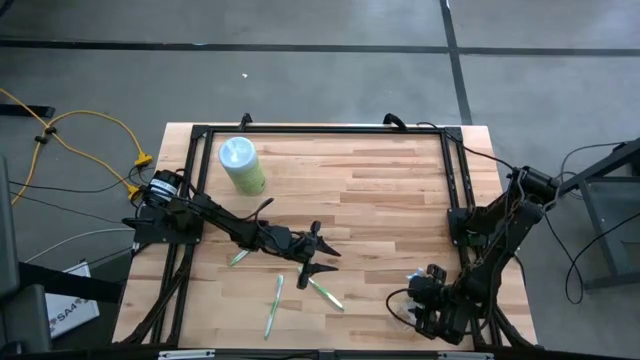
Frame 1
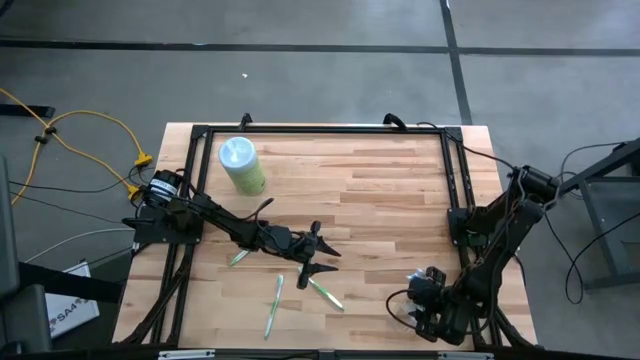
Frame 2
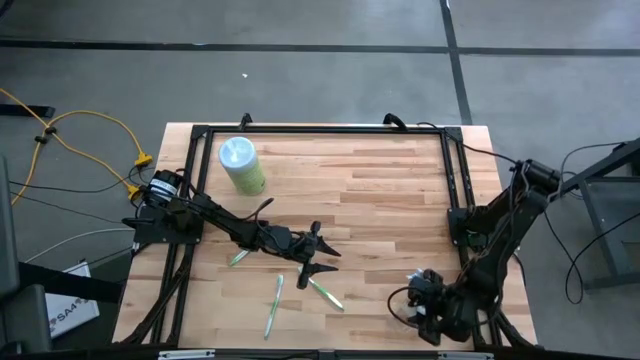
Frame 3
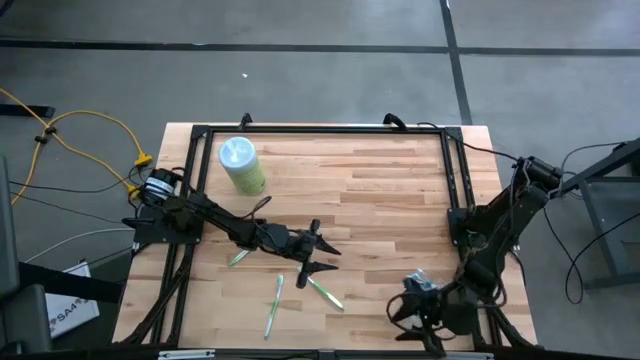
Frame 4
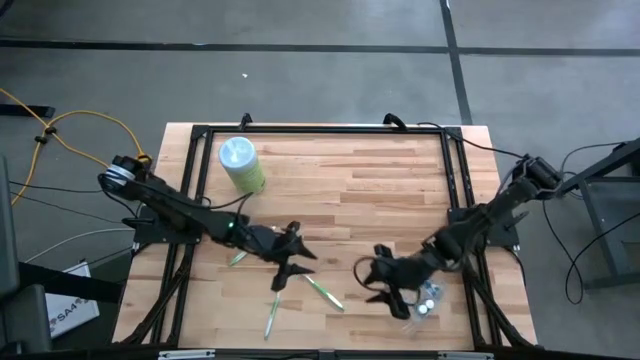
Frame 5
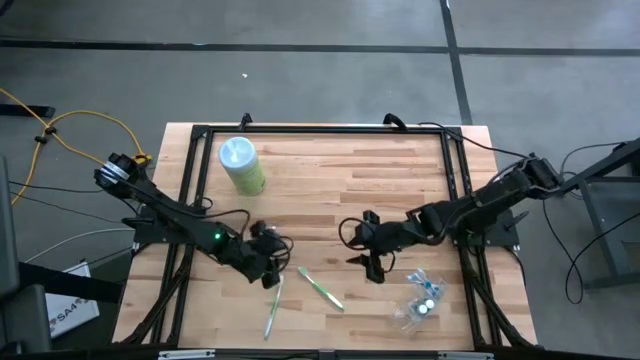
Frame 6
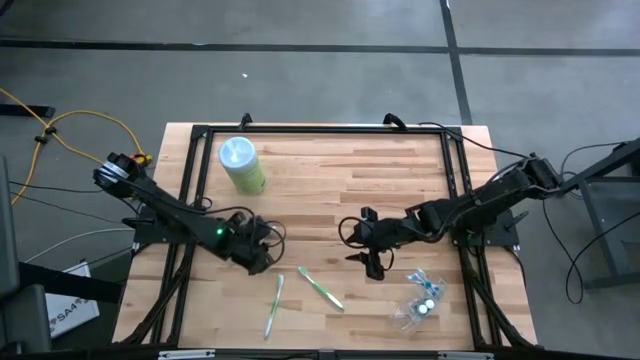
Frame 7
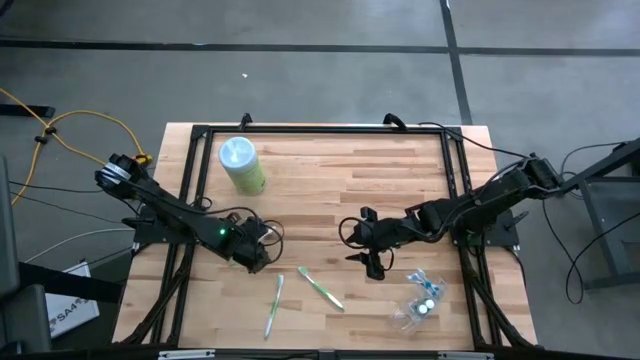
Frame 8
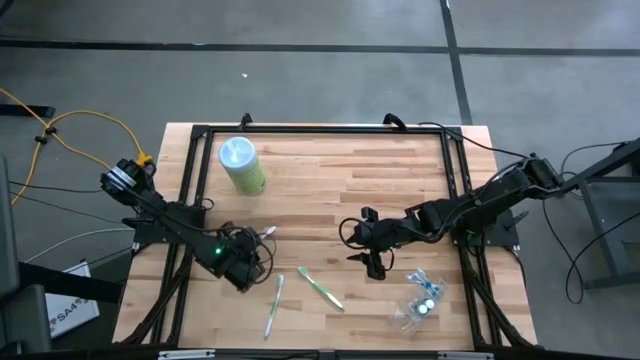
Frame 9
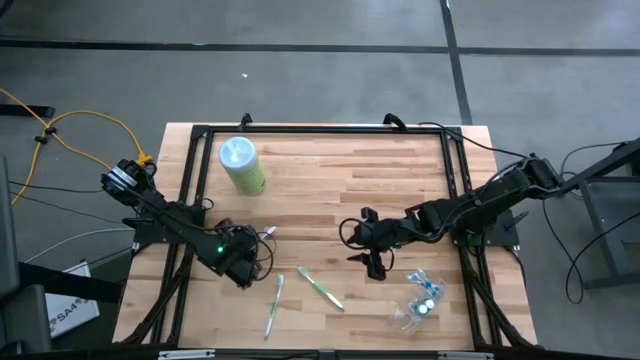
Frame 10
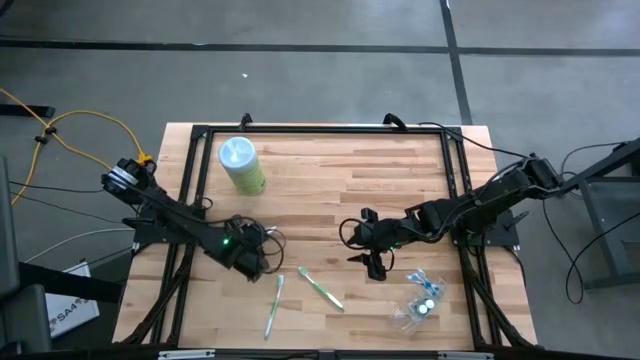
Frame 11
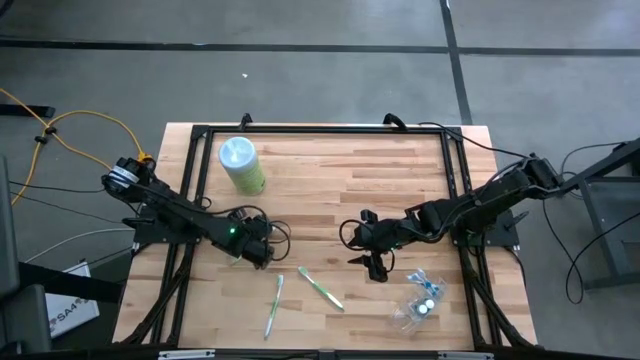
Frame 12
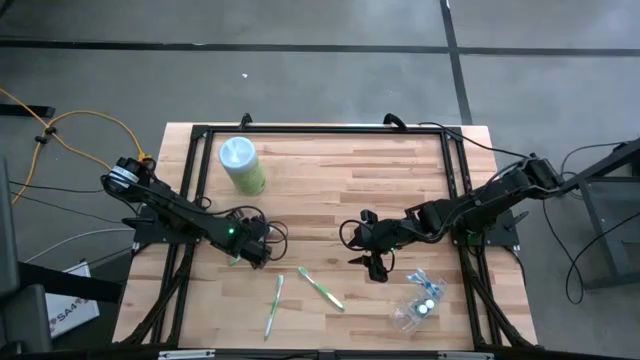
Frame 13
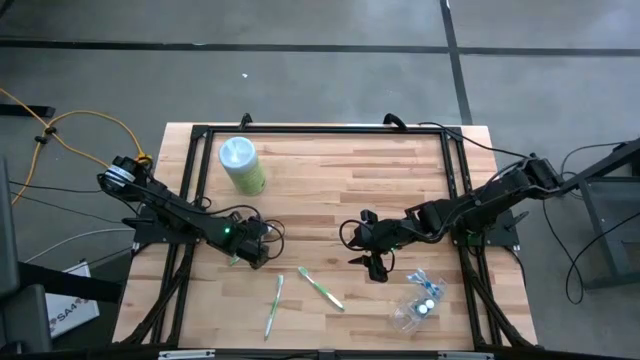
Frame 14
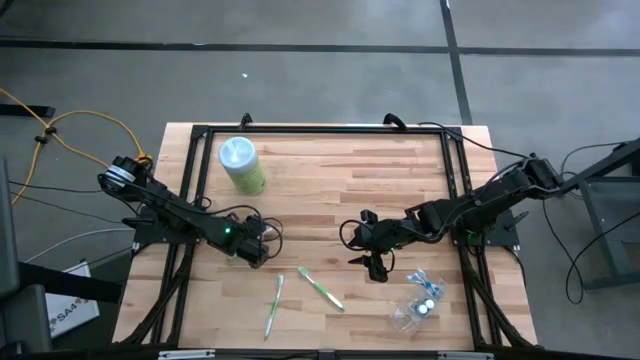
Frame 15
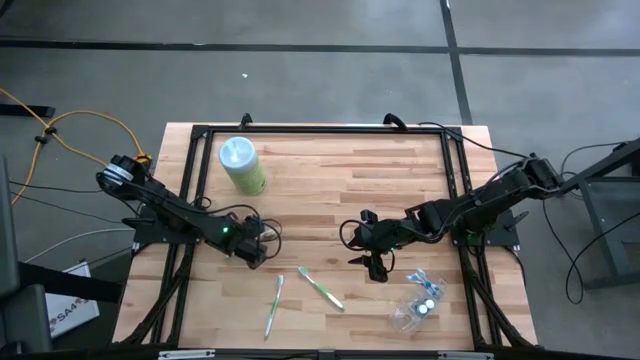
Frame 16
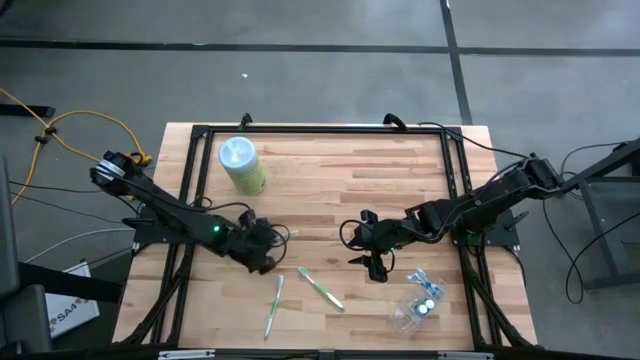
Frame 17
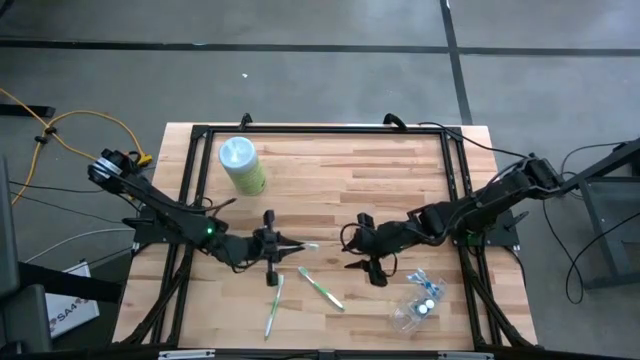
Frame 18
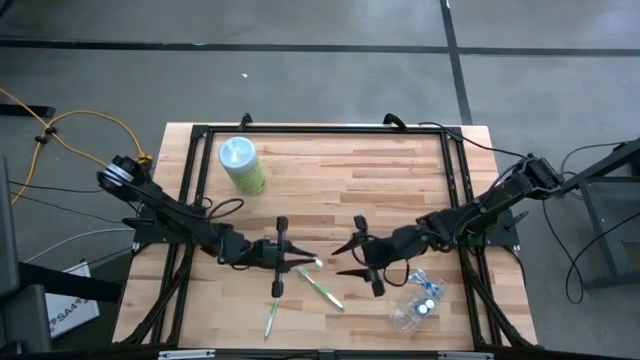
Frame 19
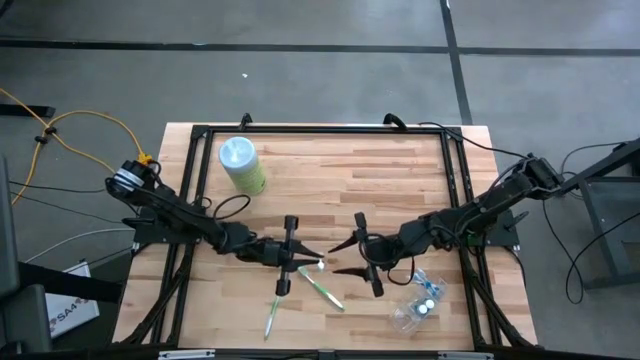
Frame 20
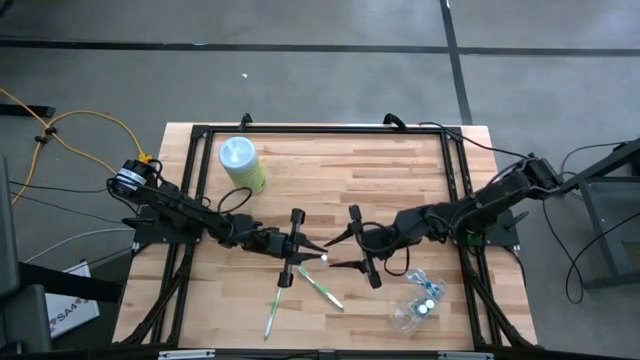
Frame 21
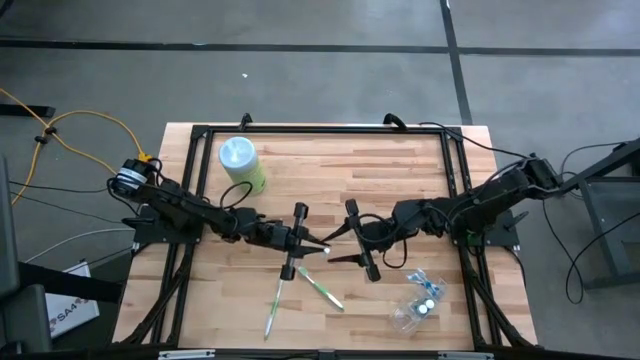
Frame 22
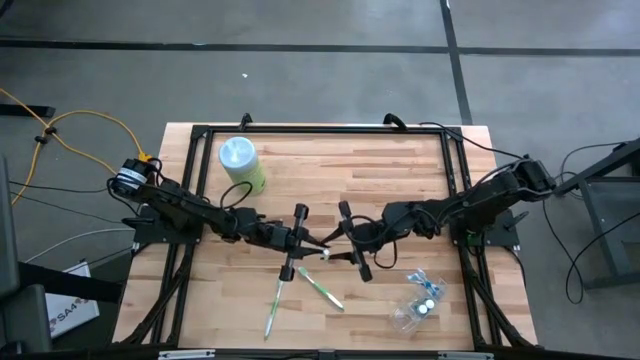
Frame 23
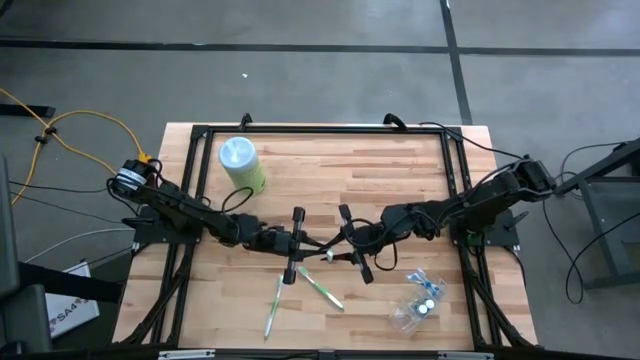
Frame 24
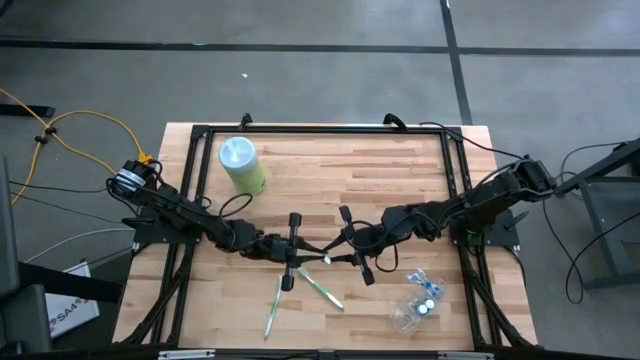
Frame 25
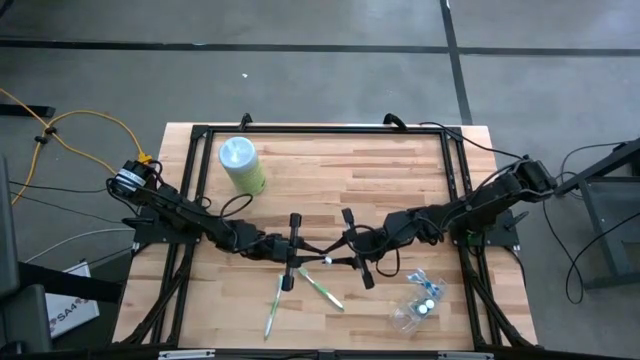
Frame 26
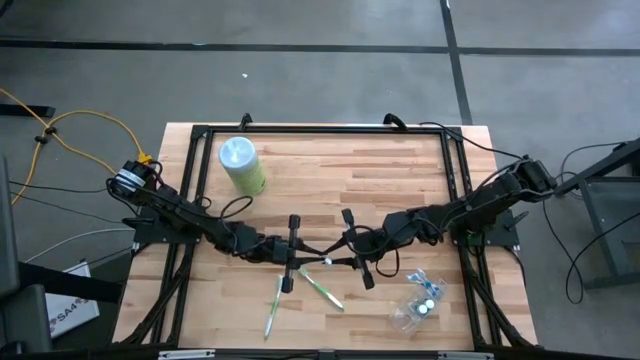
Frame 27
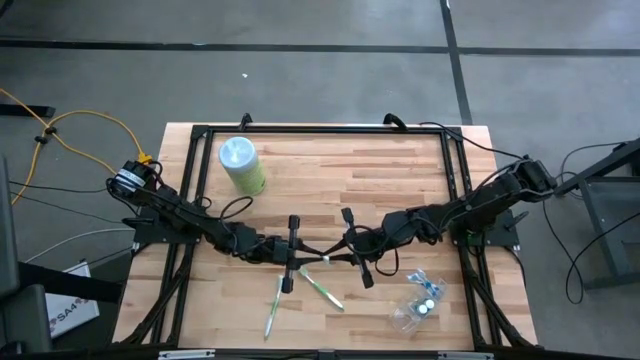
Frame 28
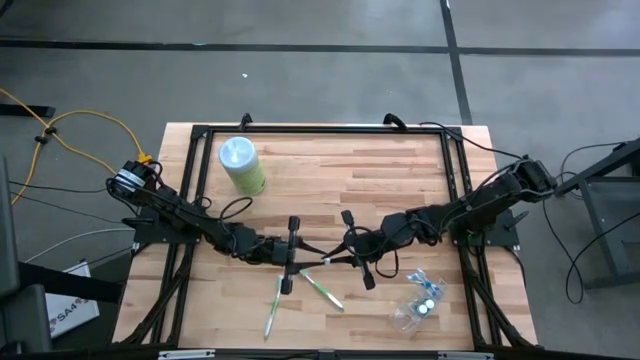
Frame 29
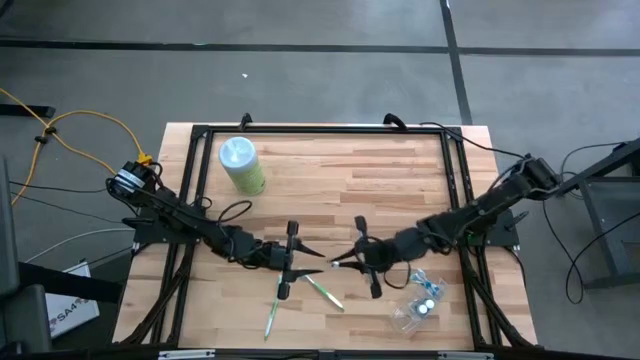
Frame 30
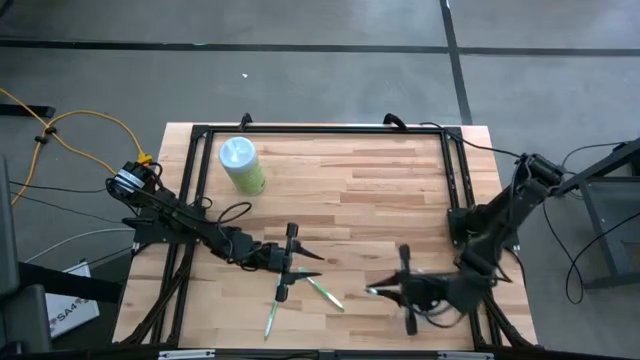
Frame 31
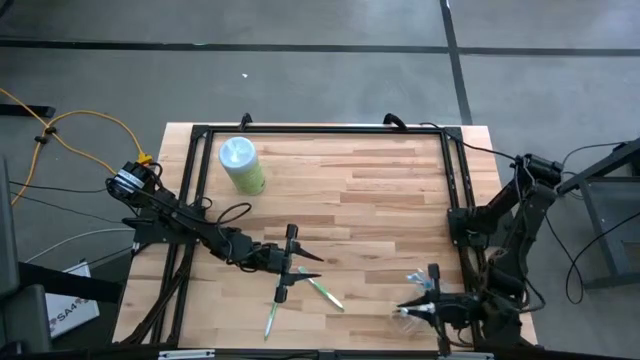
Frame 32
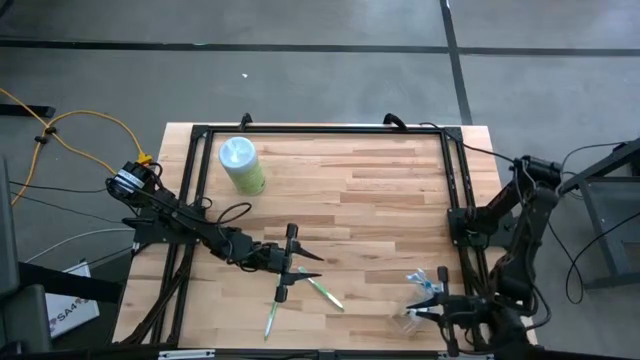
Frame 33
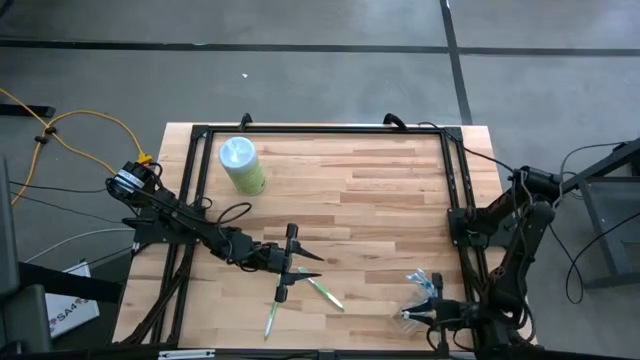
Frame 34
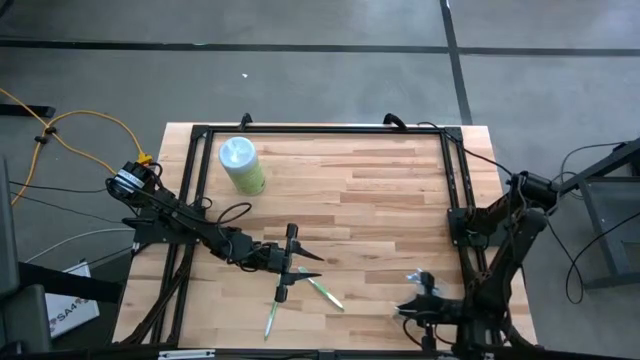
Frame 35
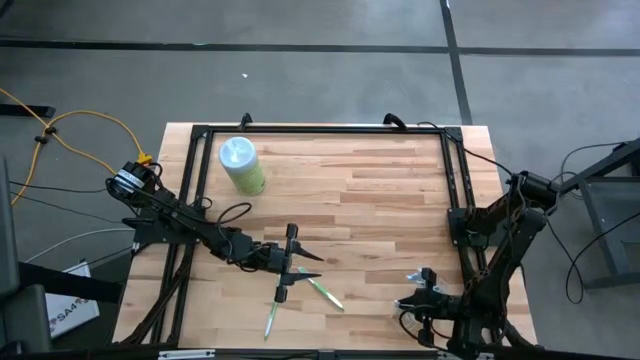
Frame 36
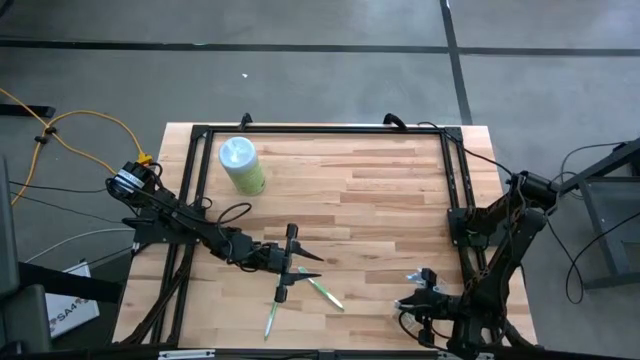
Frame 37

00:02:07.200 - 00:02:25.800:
Task: Pick & Place toothbrushing station
Put the top green toothbrush into the left section of the transparent organizer

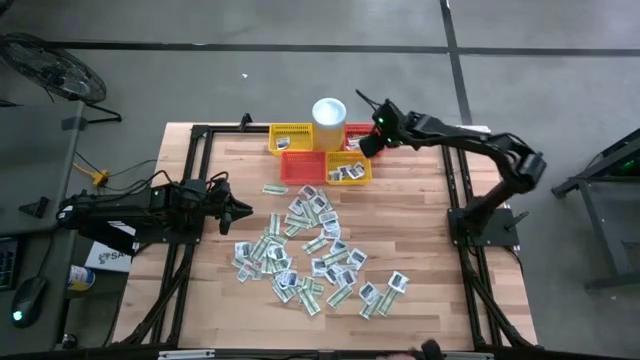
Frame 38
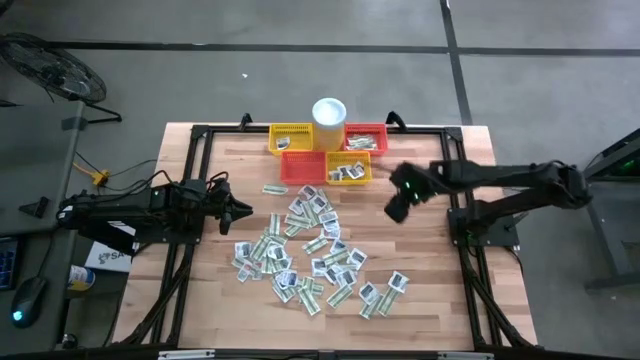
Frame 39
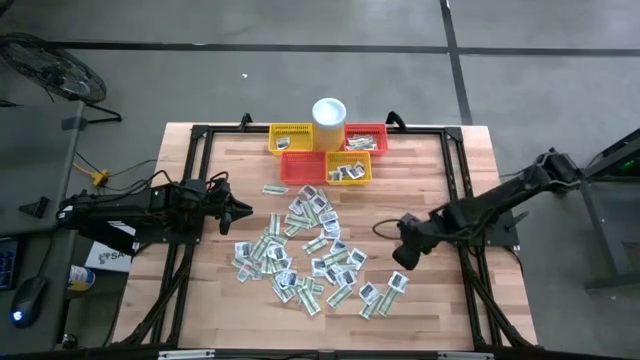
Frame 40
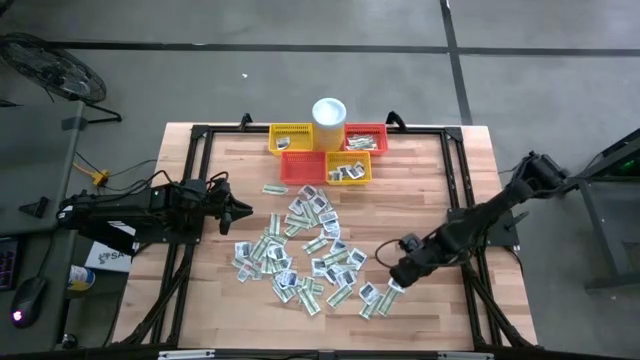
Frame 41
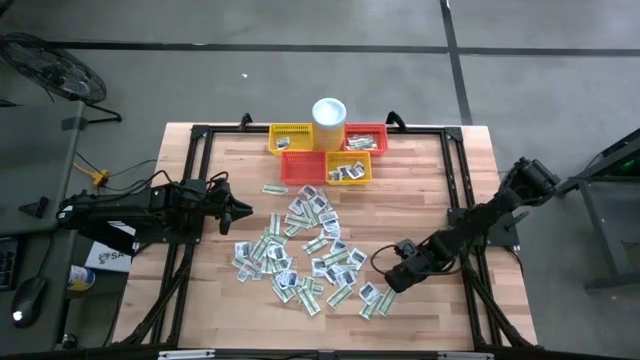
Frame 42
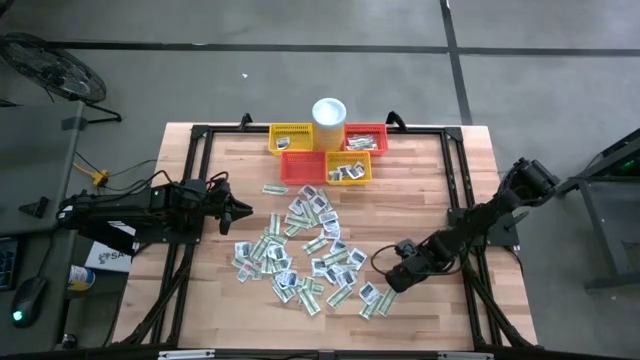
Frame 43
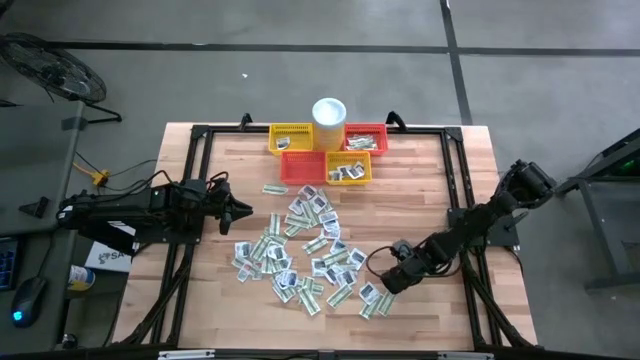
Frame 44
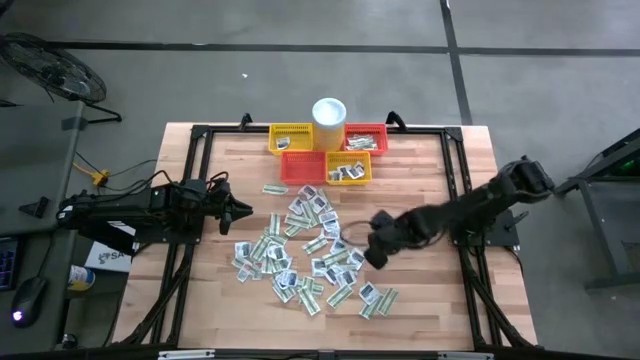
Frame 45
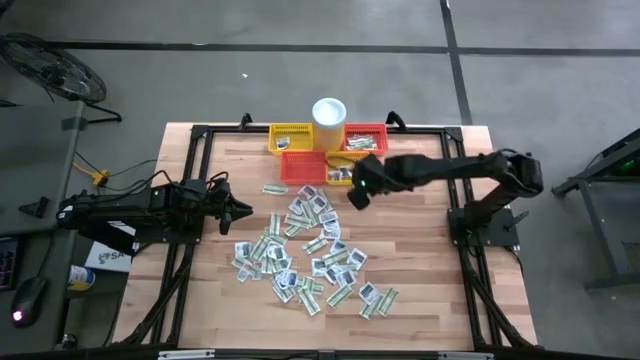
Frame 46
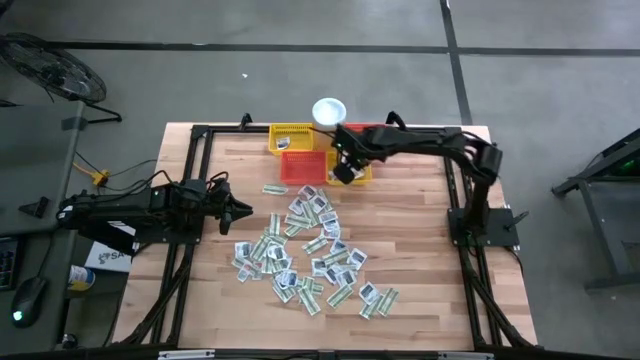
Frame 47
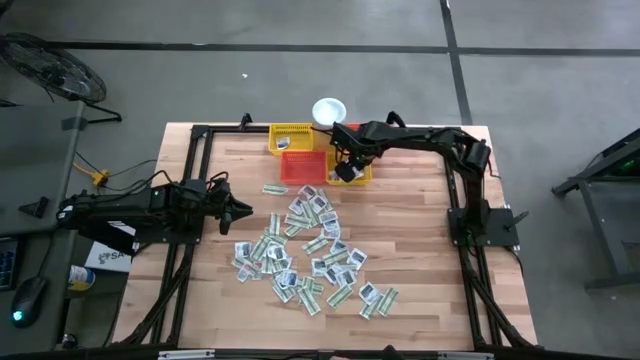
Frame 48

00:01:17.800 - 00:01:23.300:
Task: Pick & Place First Aid Supplies
Put the black towelette pack into the bottom yellow basket
